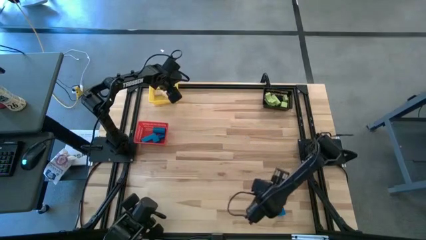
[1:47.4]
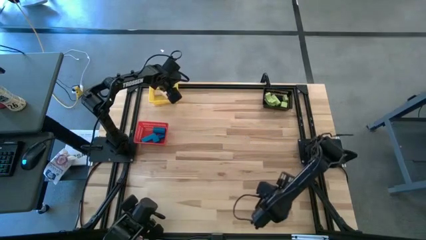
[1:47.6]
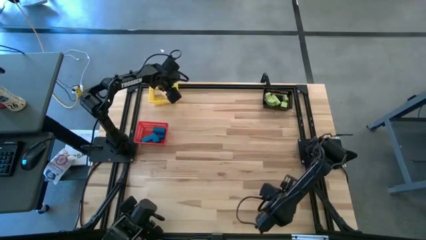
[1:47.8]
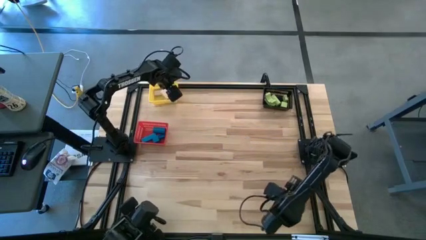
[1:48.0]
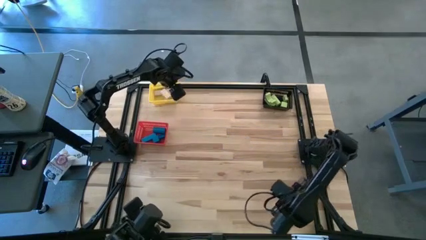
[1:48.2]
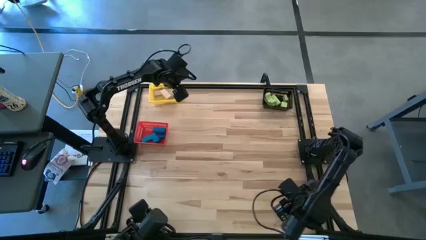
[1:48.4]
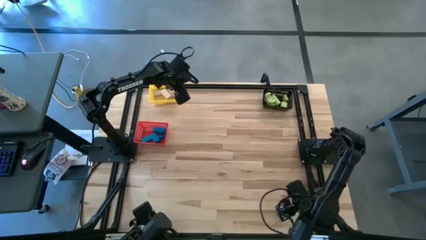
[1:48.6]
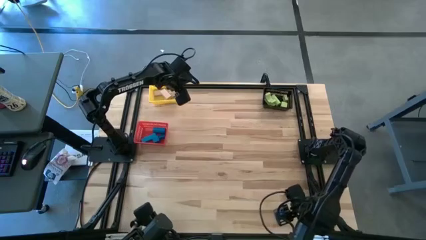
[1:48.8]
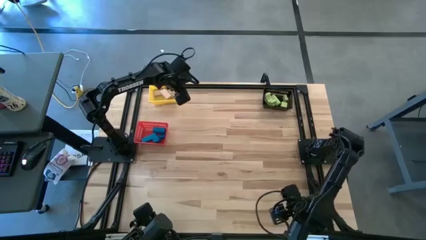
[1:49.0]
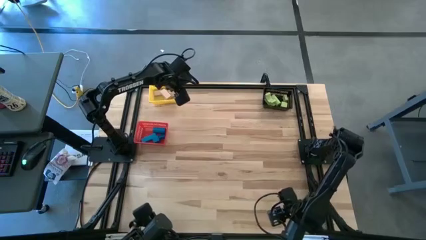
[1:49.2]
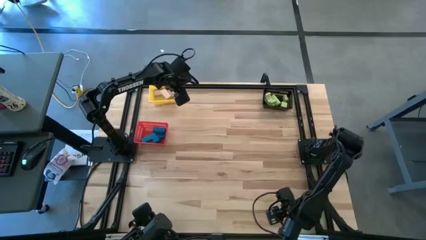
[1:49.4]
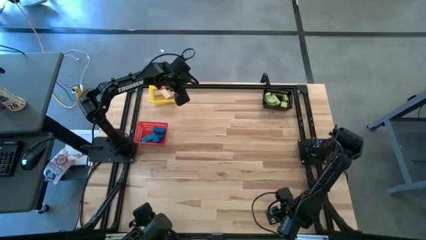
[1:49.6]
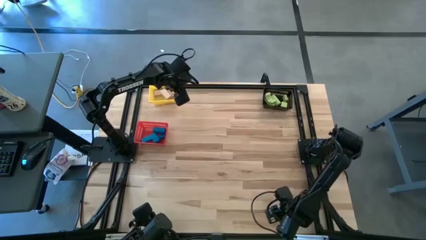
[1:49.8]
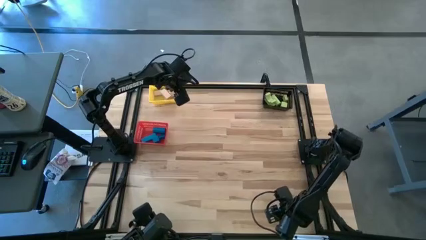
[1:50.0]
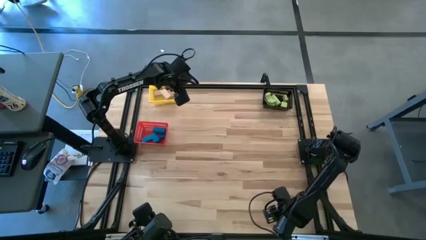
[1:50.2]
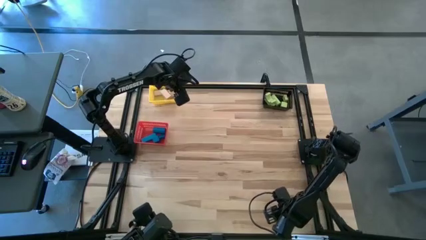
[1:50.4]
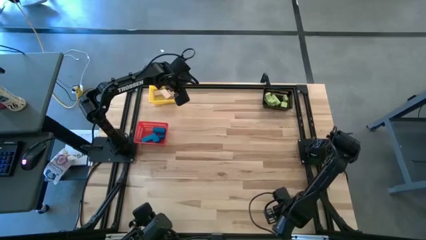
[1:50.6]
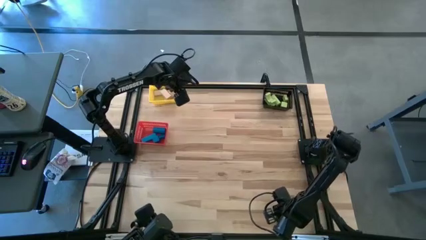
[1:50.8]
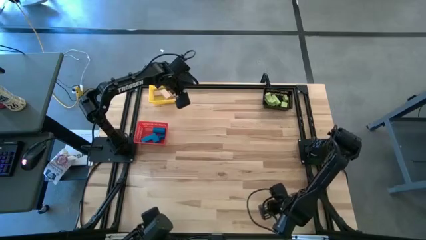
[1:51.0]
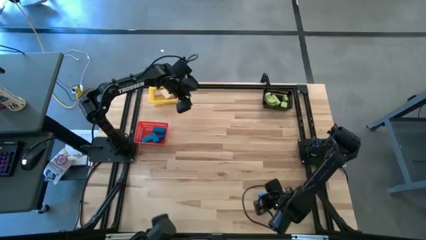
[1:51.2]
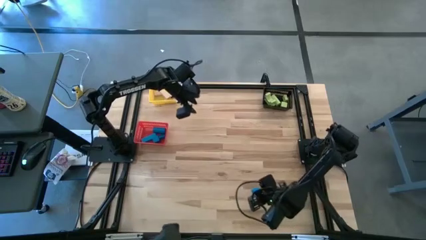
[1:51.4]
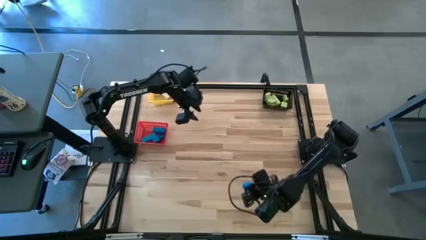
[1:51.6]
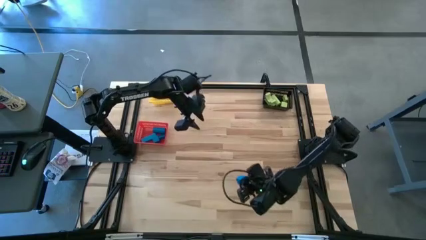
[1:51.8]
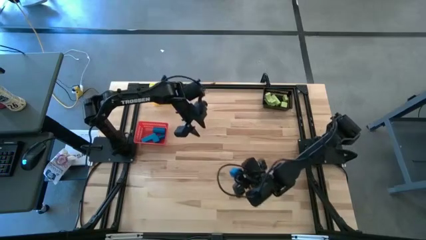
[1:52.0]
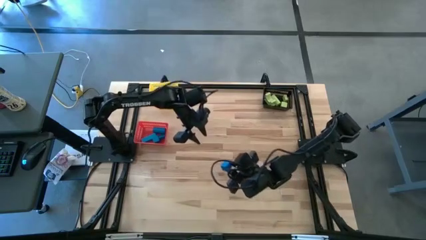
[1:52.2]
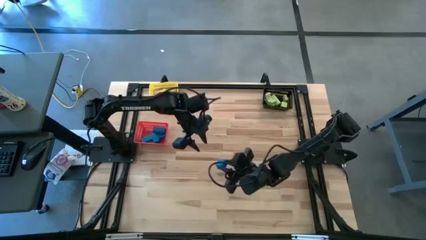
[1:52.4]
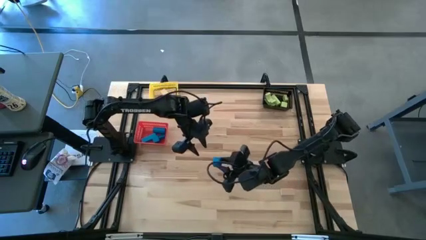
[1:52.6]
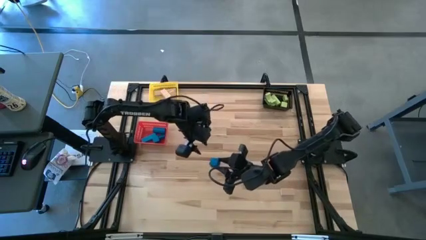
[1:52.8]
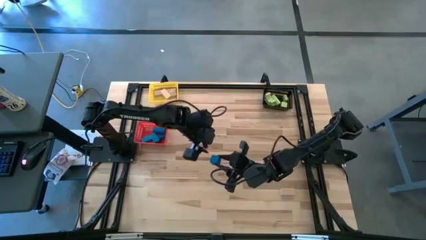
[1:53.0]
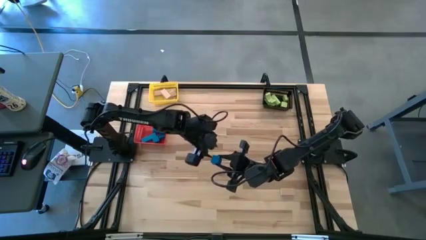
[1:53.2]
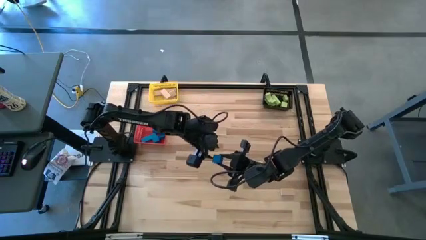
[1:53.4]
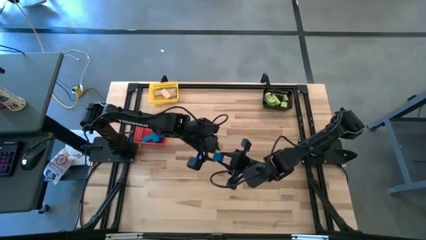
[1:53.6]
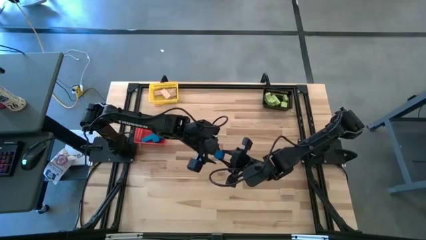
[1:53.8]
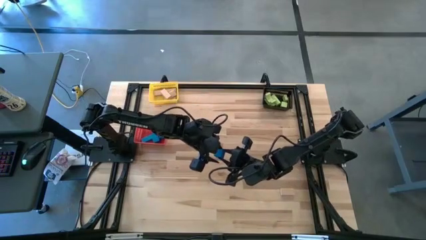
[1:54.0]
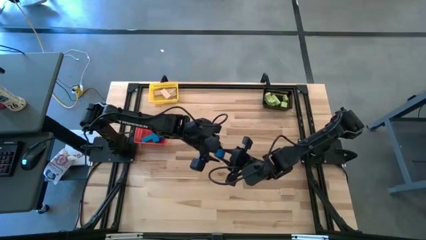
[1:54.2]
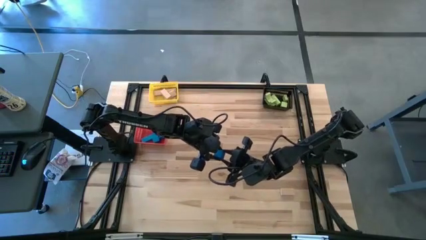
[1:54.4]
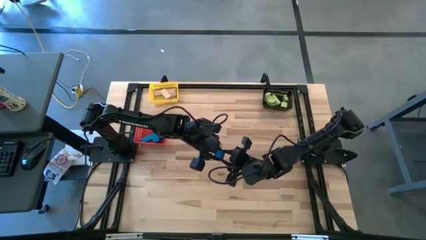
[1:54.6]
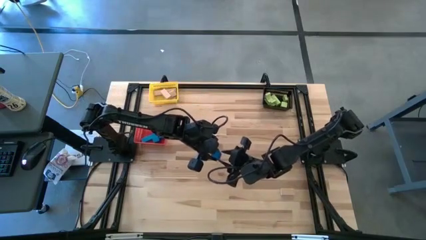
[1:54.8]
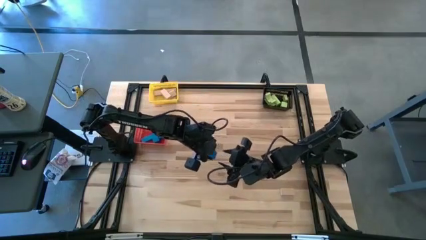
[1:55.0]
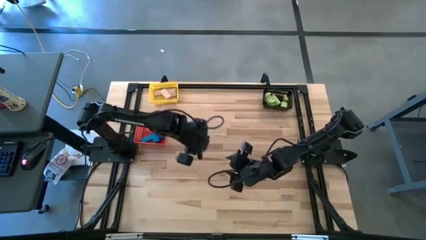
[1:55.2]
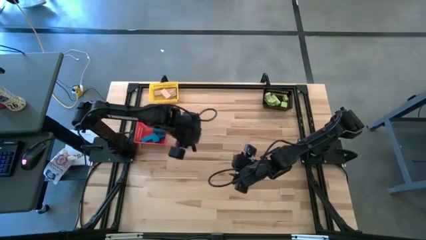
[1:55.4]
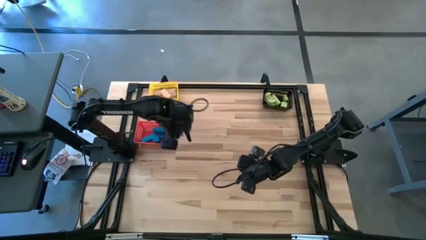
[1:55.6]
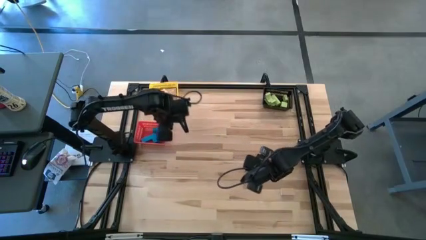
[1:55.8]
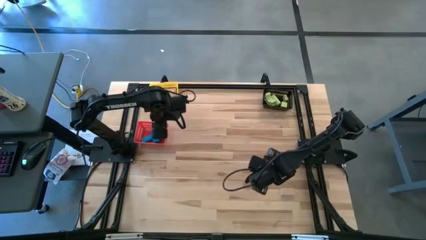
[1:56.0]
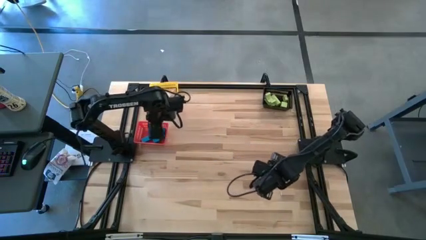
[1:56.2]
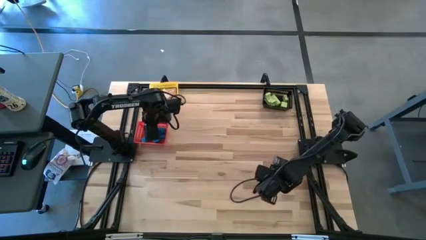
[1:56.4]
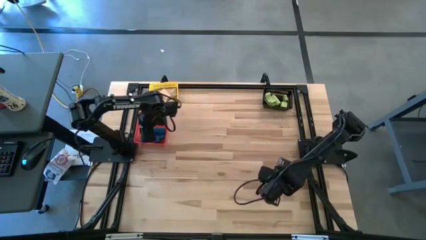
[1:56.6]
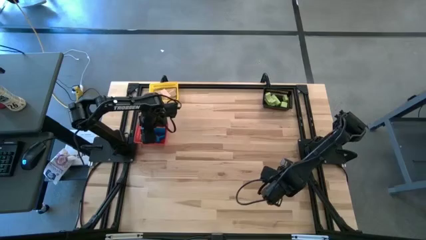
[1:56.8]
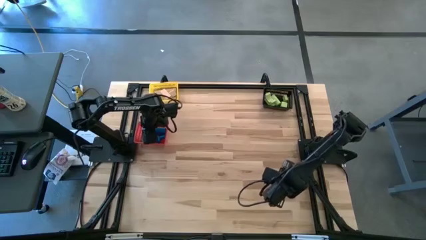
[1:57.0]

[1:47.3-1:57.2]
Task: Sort & place blocks by color
Put the blue block into the red bin

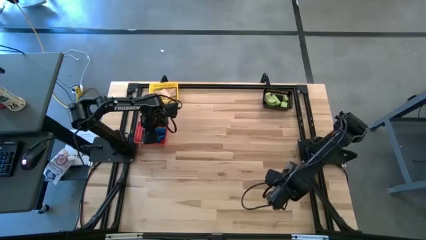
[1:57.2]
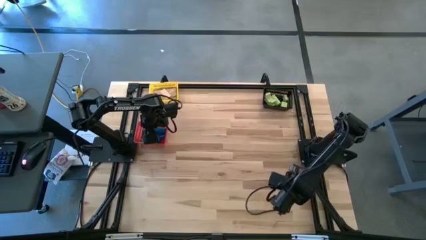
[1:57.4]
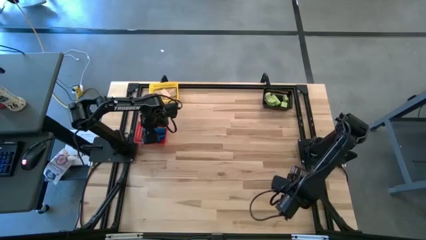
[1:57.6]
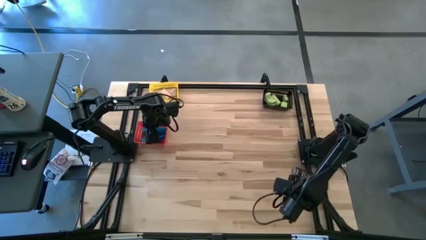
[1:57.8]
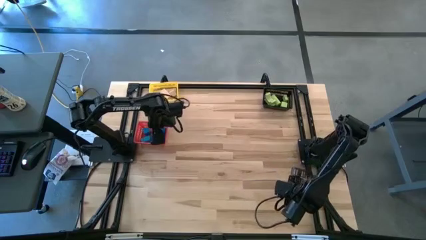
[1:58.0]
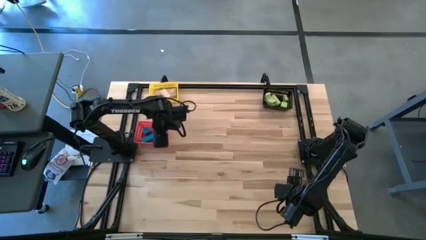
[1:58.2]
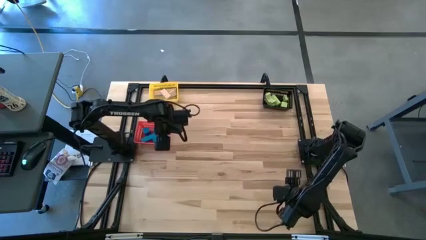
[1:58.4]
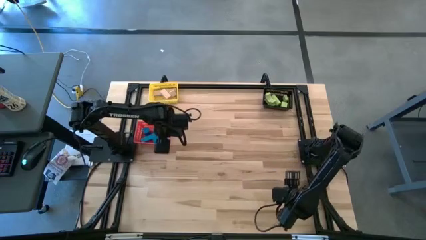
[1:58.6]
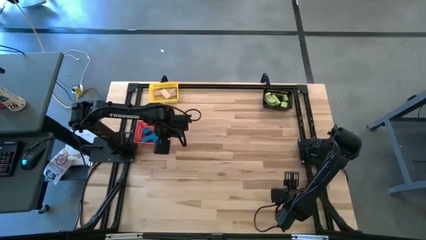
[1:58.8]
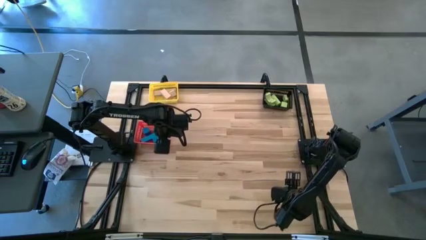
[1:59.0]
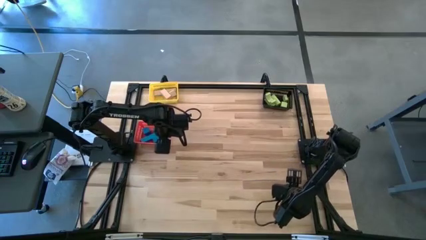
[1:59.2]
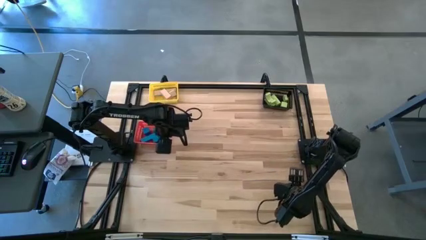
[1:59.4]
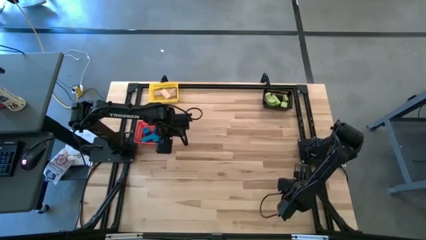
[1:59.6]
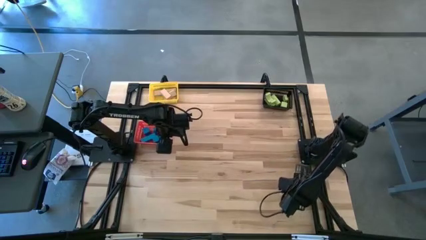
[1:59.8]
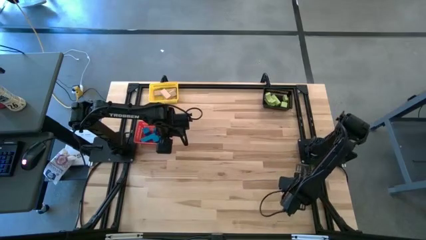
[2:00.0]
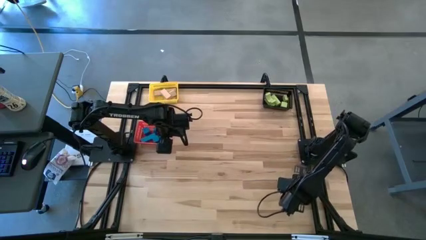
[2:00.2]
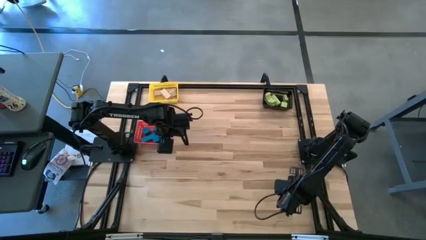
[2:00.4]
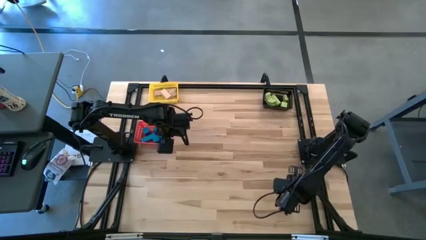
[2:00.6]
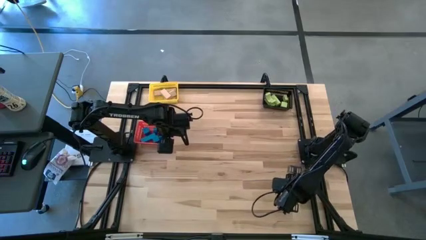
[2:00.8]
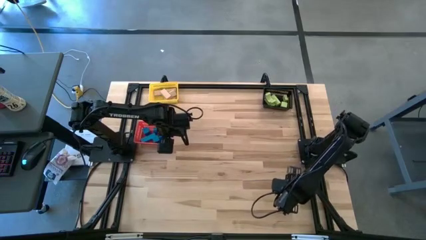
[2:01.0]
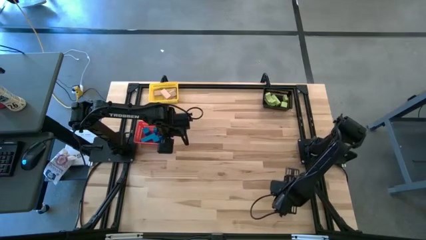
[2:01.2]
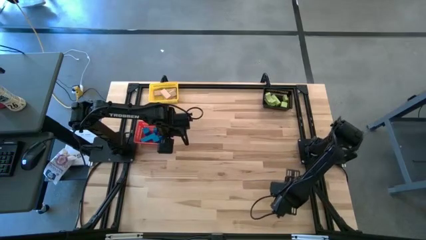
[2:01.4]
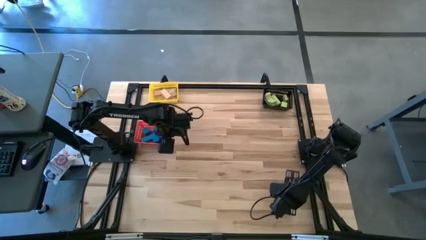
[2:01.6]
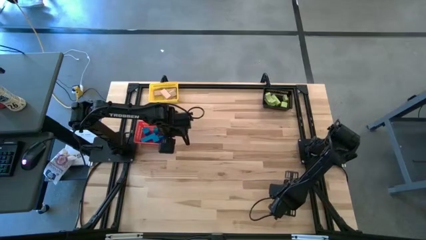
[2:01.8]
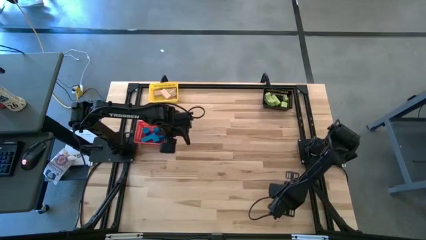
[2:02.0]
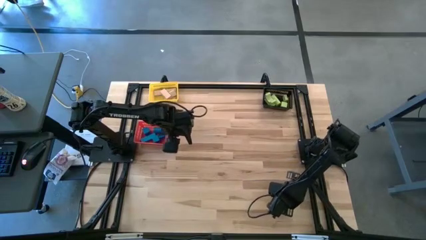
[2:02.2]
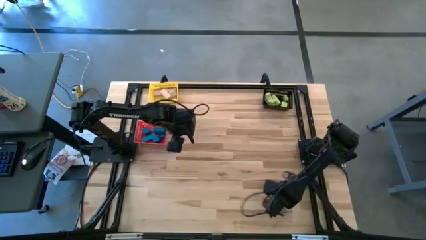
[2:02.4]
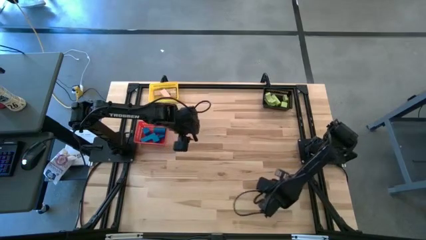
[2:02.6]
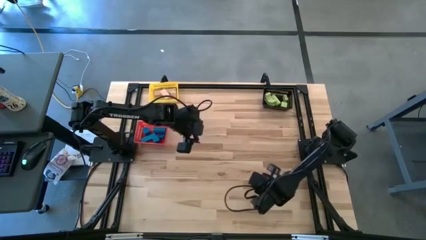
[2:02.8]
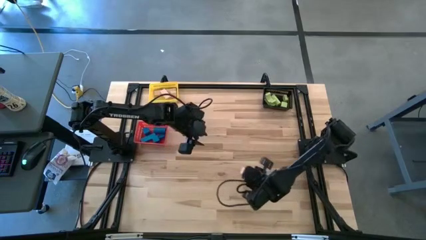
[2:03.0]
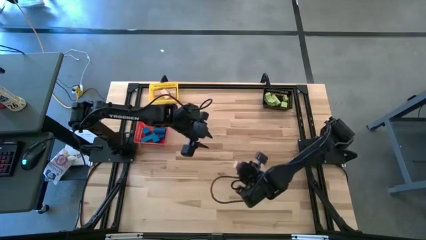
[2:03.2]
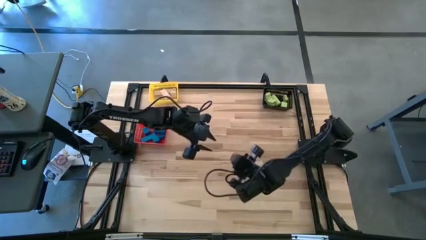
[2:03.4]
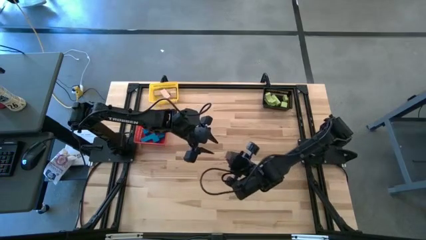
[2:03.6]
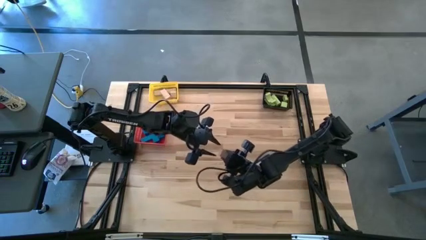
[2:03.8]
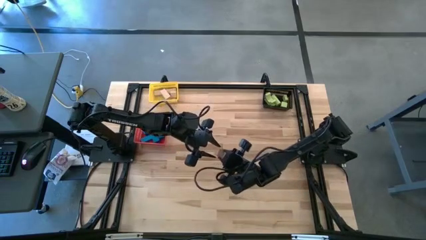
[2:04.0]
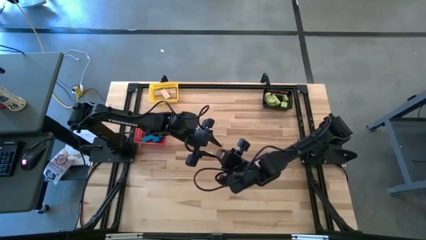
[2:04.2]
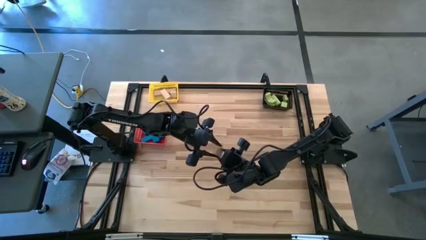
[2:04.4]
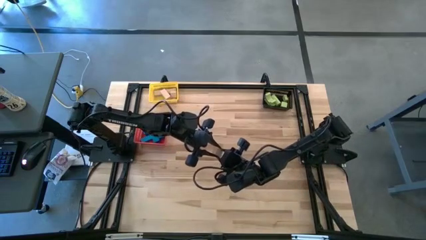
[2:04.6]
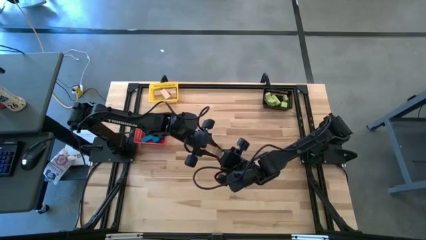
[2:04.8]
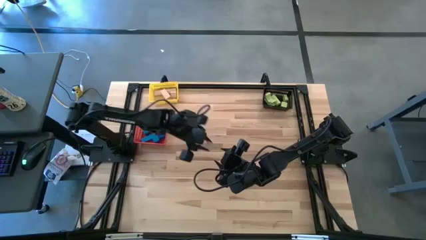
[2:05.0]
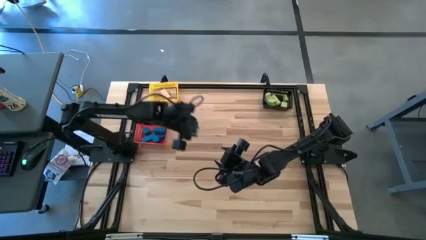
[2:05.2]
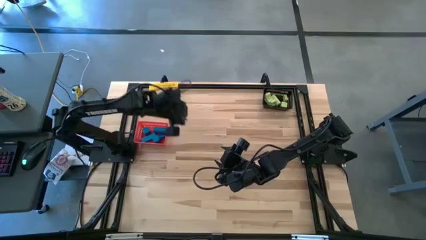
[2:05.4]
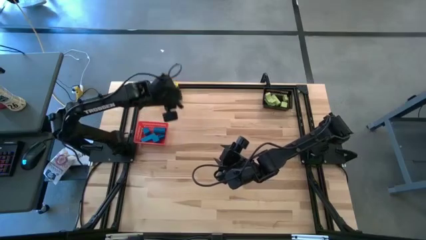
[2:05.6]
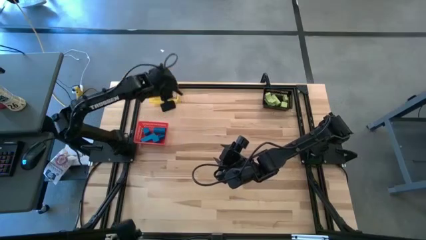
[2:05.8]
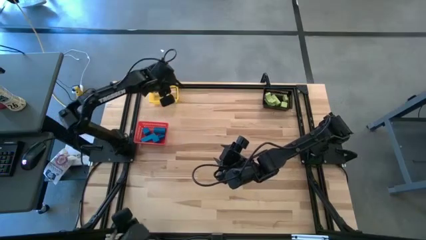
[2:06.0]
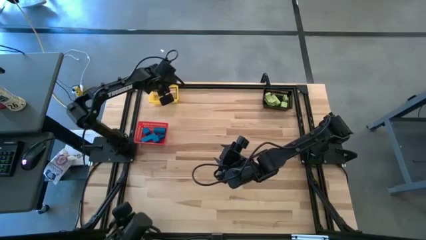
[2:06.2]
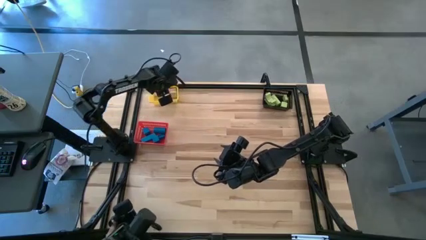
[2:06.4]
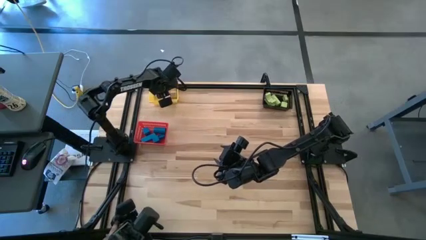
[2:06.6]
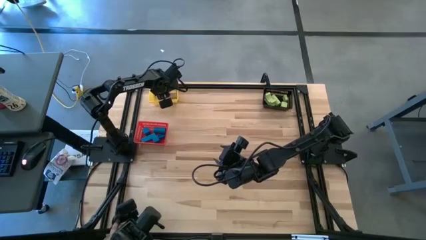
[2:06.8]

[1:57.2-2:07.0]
Put the brown block into the yellow bin
